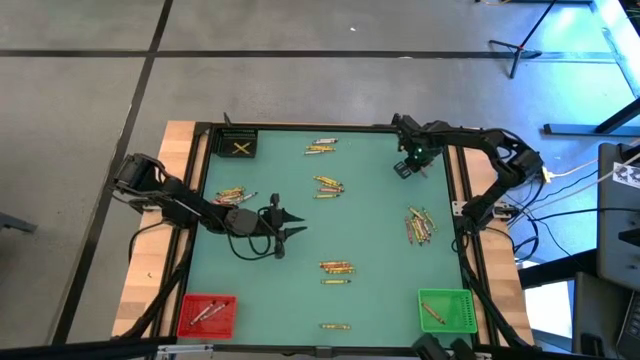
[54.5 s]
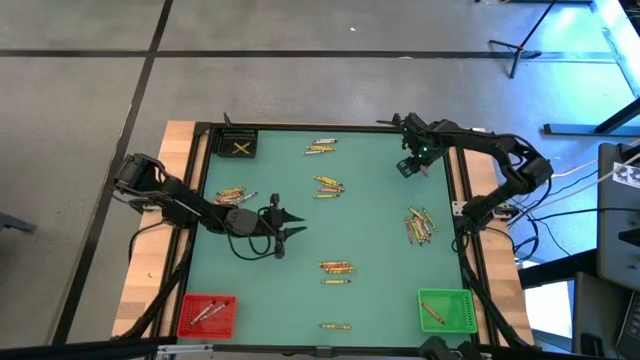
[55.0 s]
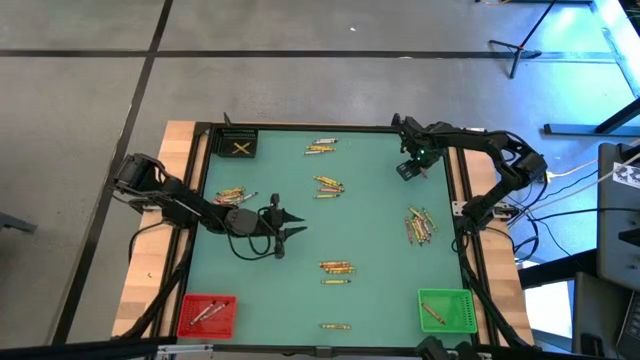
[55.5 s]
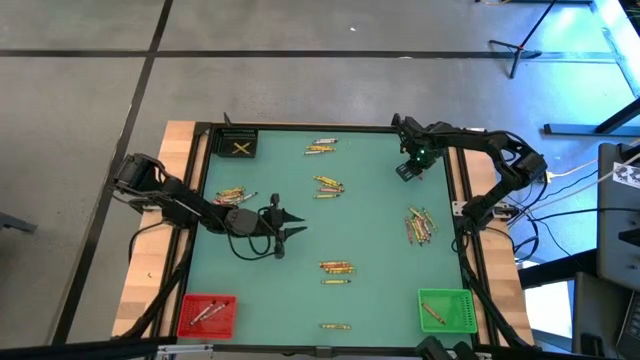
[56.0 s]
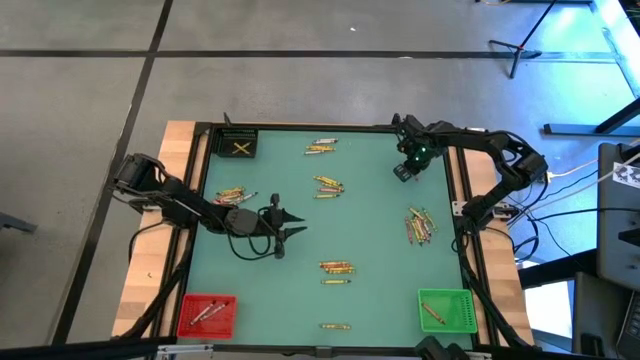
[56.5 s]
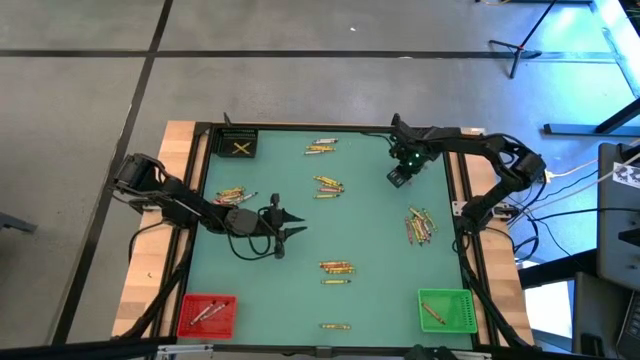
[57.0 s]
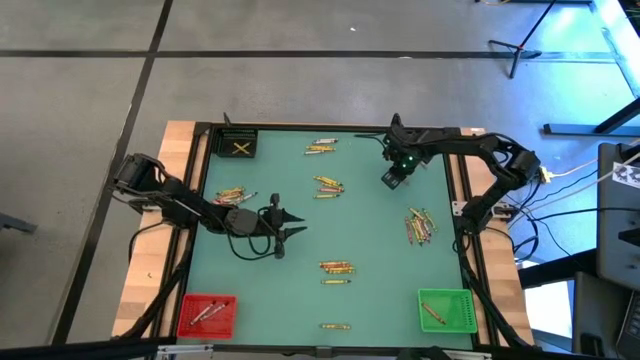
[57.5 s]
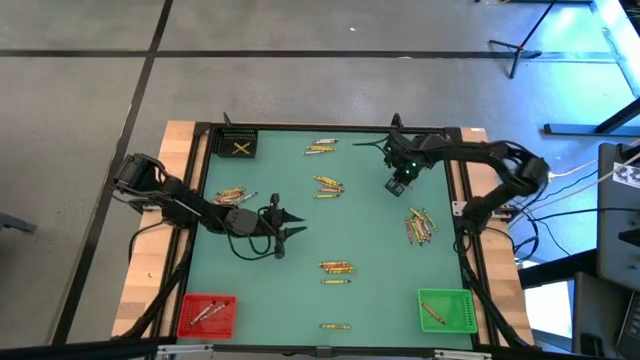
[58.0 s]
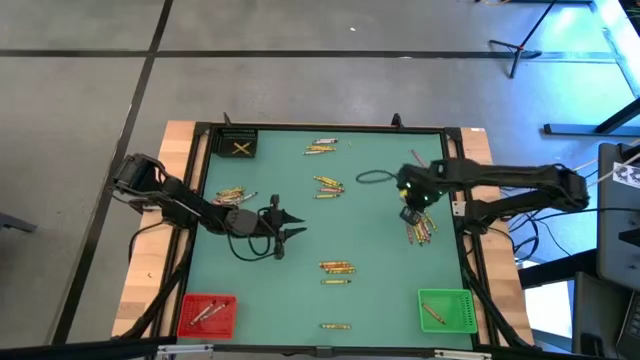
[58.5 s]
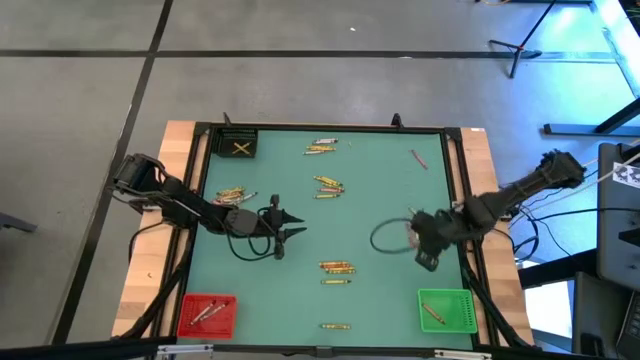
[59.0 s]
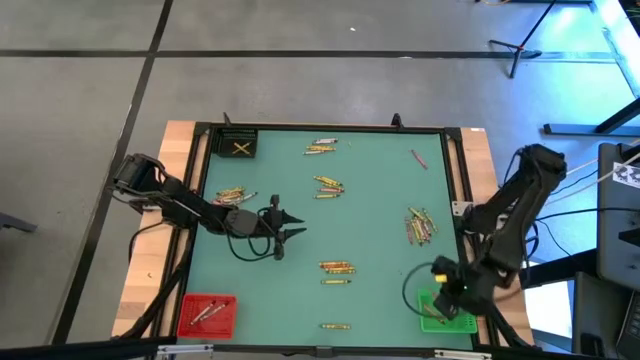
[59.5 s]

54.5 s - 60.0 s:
Task: Sort crayons
Put the red crayon into the green bin

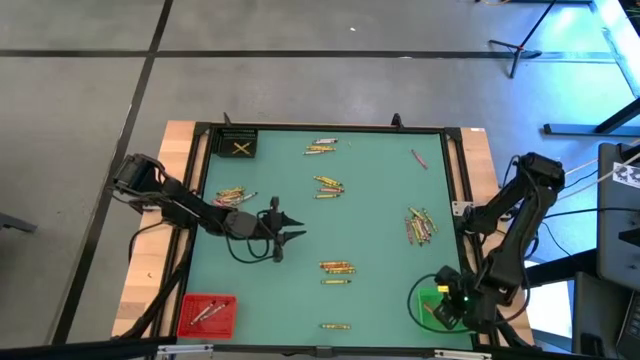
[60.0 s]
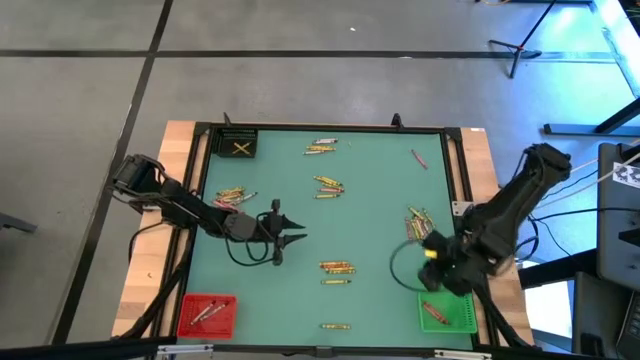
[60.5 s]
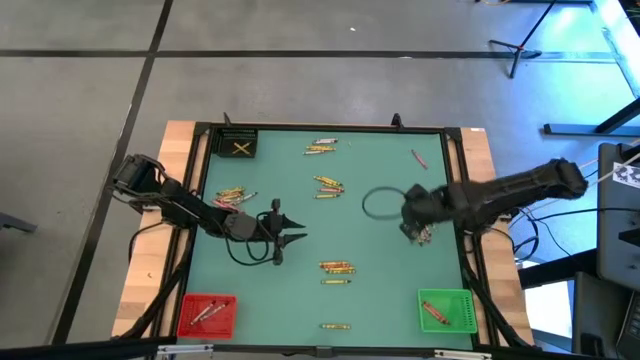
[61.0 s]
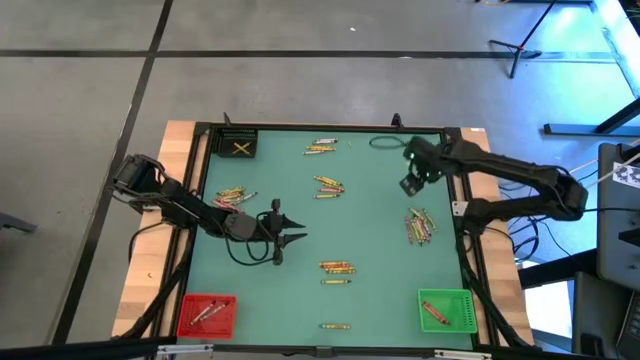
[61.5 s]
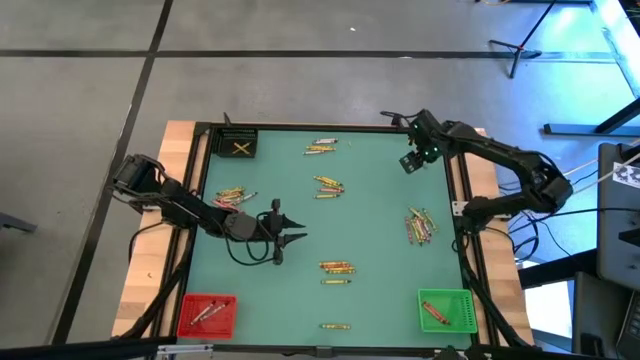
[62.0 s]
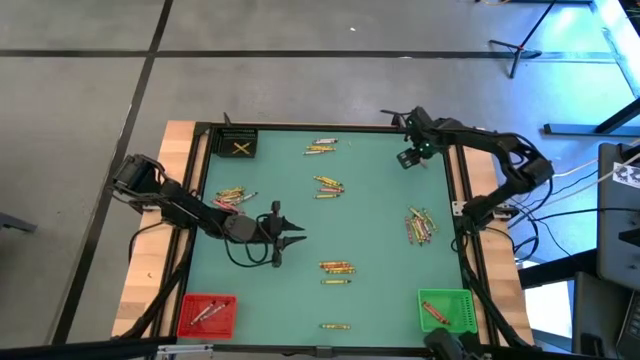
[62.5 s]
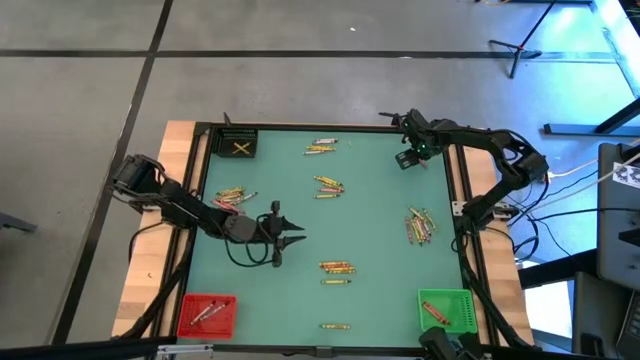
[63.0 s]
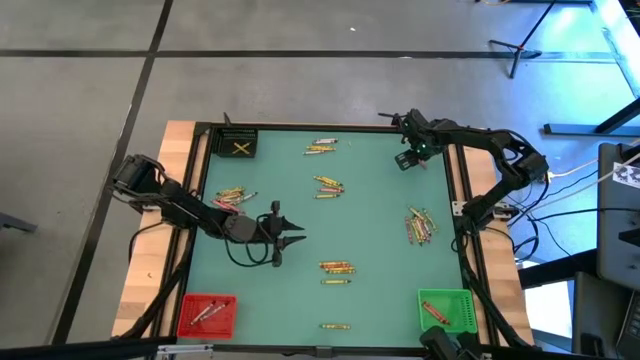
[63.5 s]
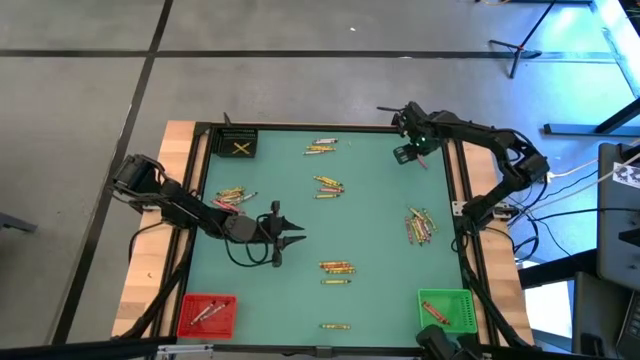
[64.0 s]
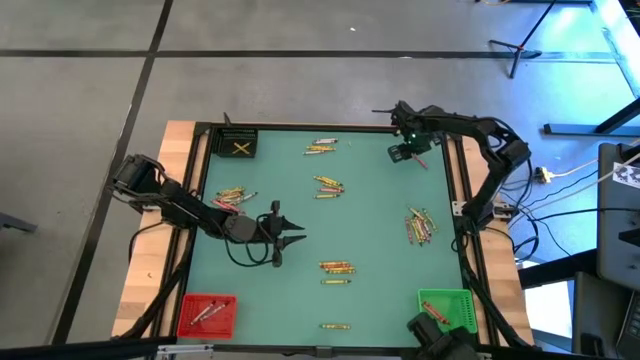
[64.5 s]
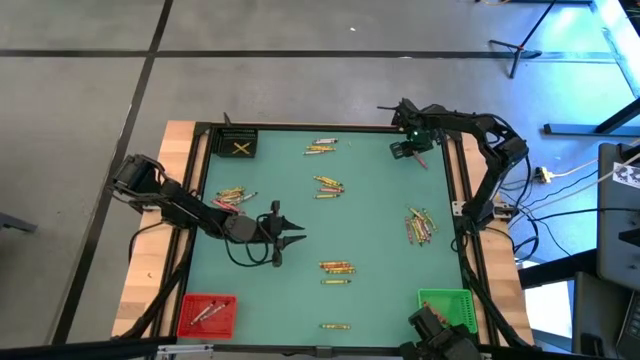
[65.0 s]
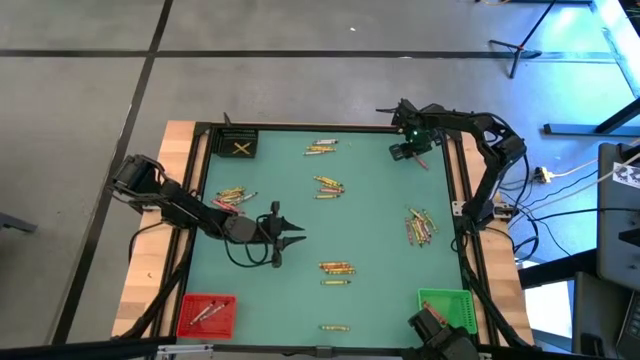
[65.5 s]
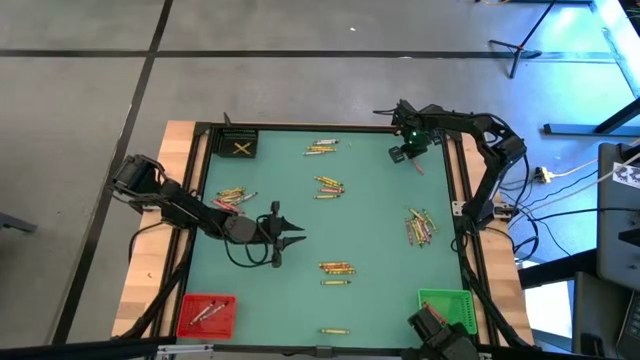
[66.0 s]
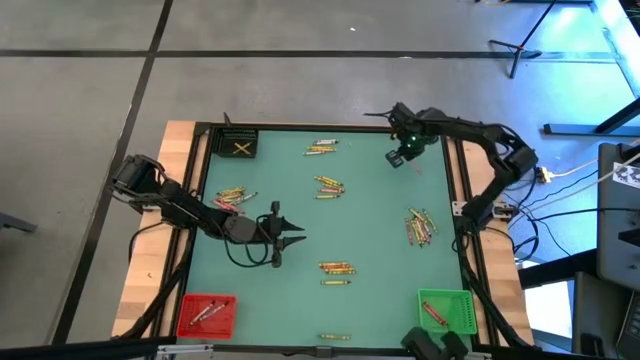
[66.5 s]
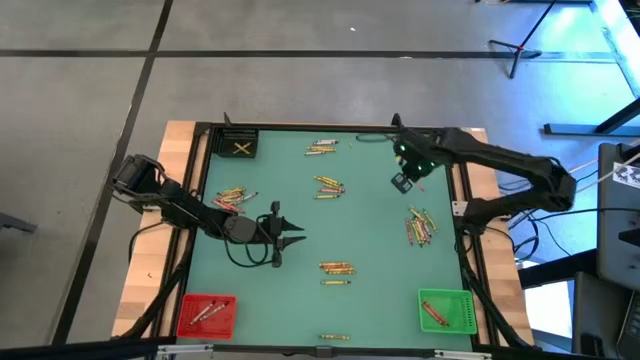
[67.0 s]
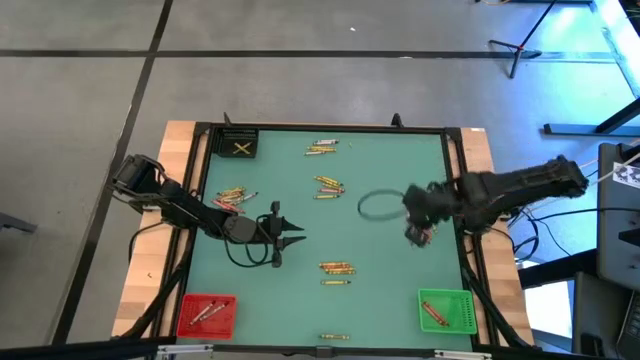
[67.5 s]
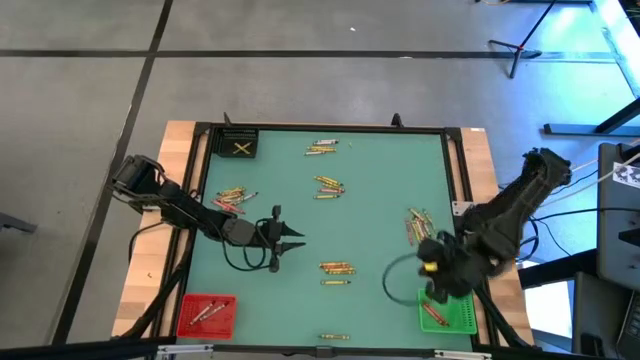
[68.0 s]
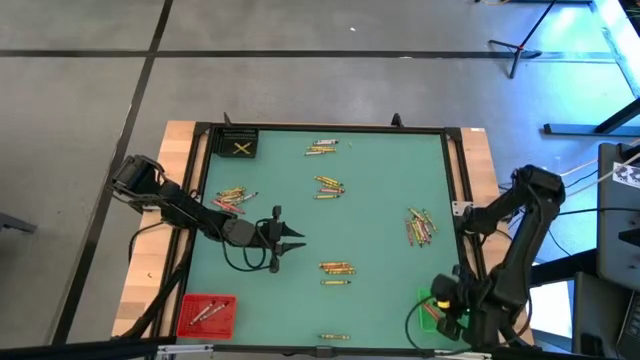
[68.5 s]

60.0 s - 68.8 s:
Put the red crayon into the green bin

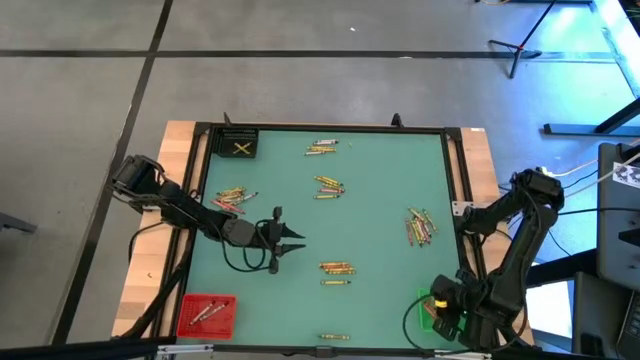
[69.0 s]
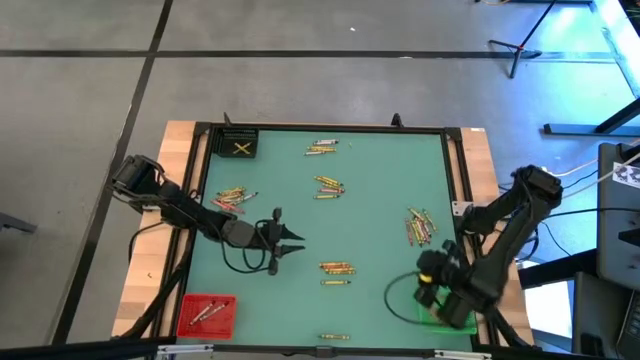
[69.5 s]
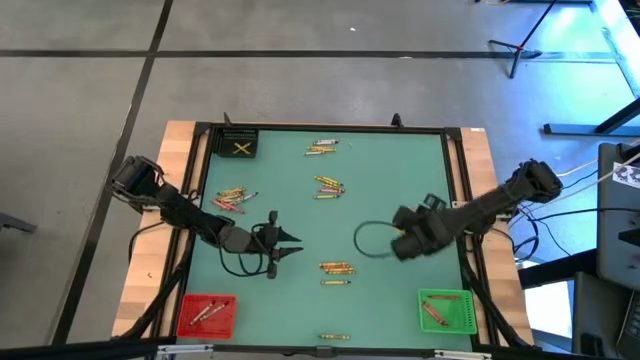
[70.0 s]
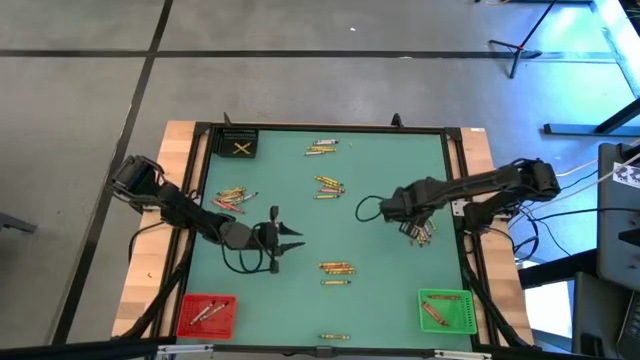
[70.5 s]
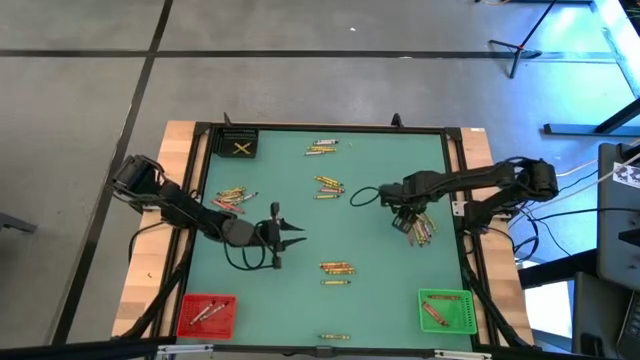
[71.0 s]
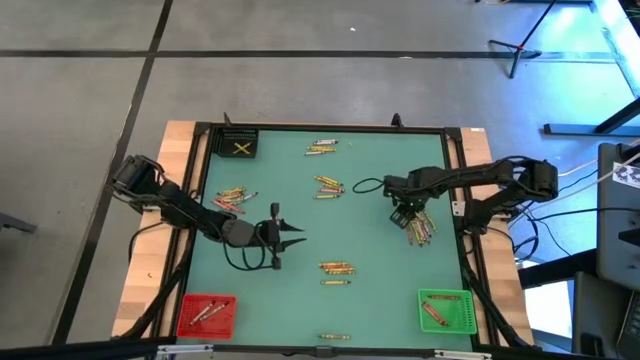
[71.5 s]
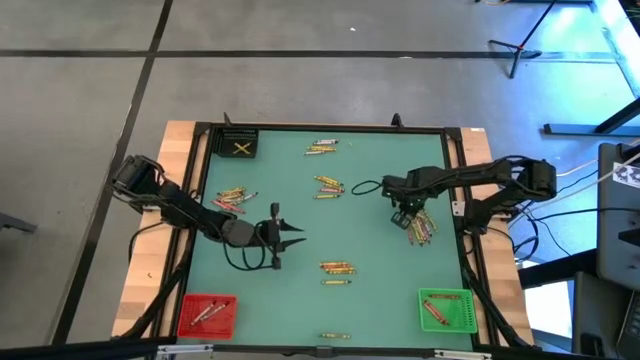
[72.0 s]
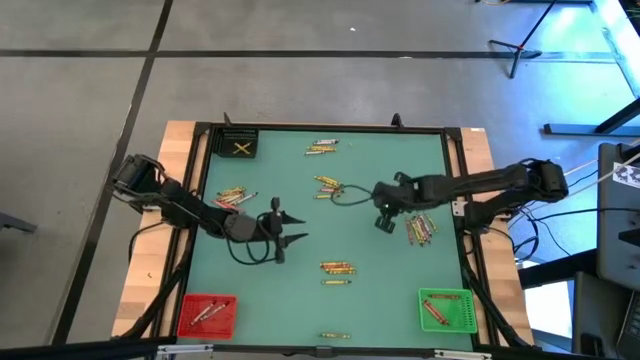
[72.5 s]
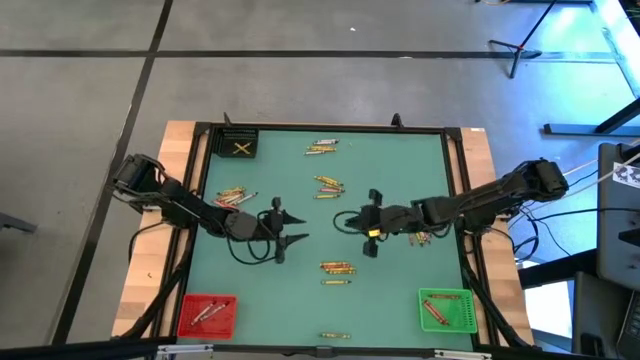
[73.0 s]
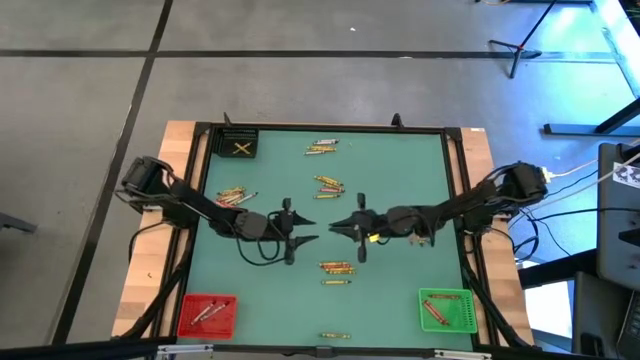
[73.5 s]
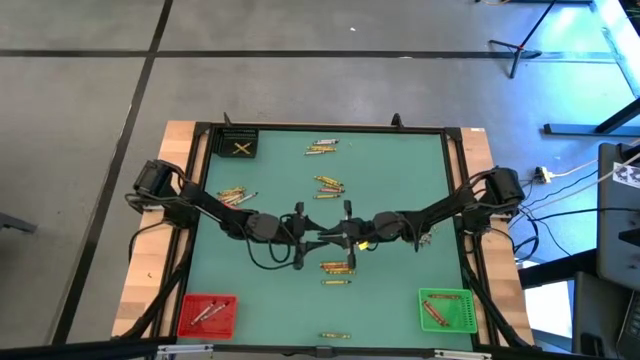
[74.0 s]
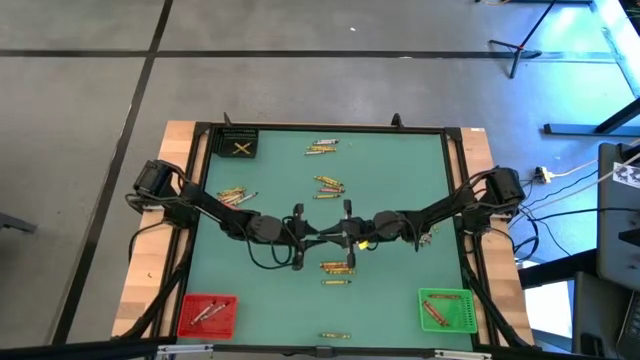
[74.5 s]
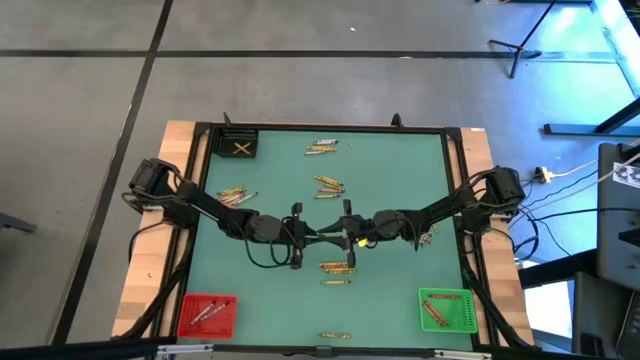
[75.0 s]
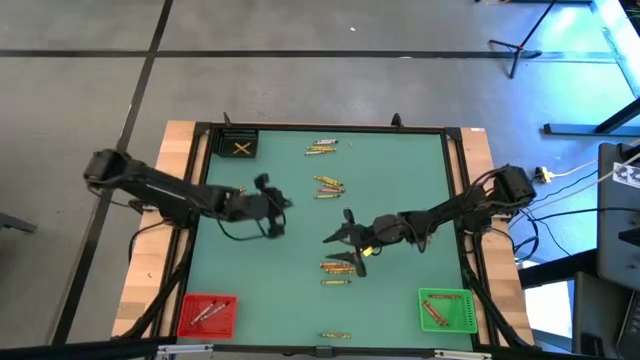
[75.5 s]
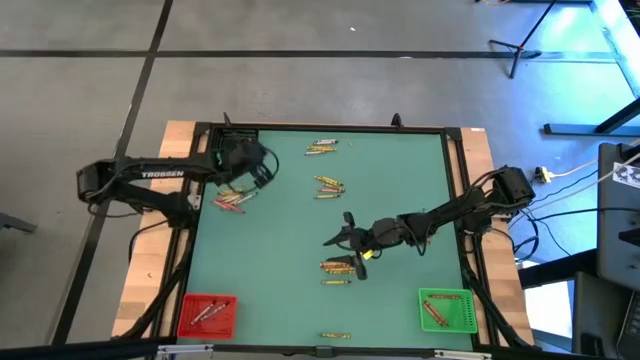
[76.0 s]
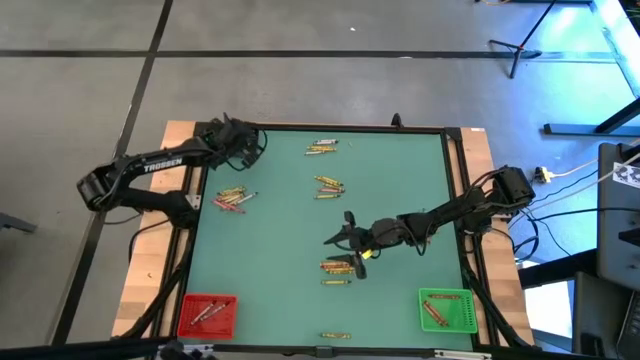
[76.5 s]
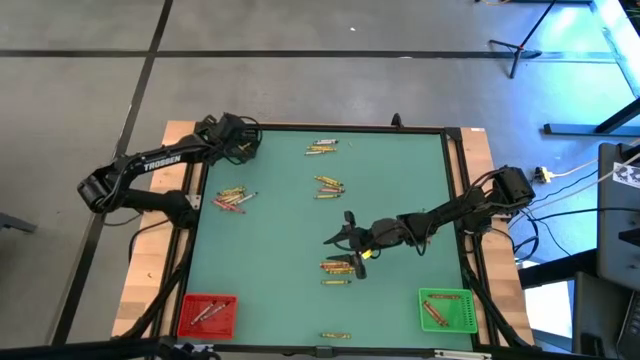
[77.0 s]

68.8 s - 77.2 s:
Put the green crayon into the black bin
